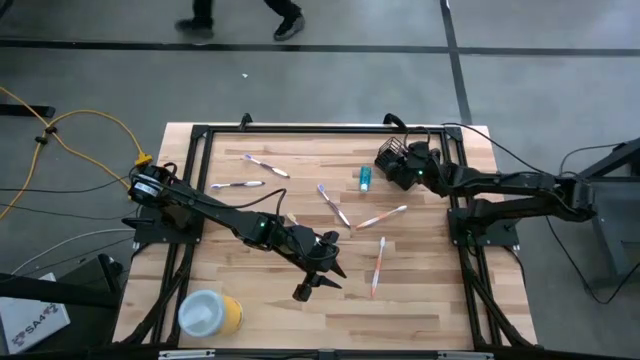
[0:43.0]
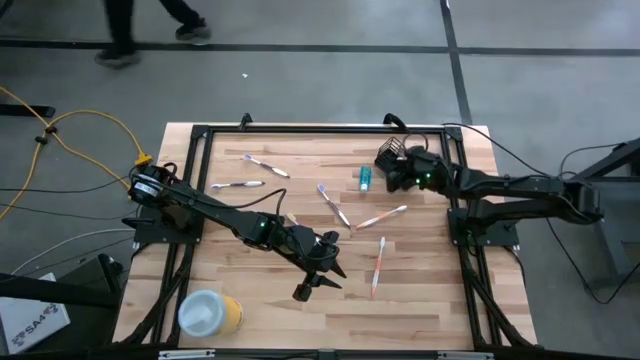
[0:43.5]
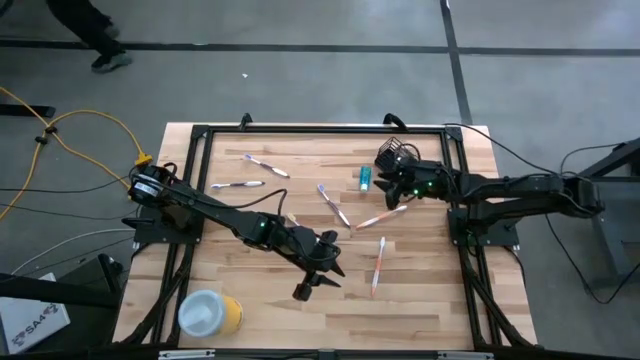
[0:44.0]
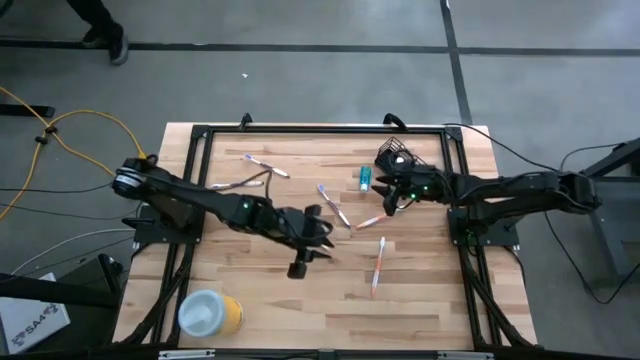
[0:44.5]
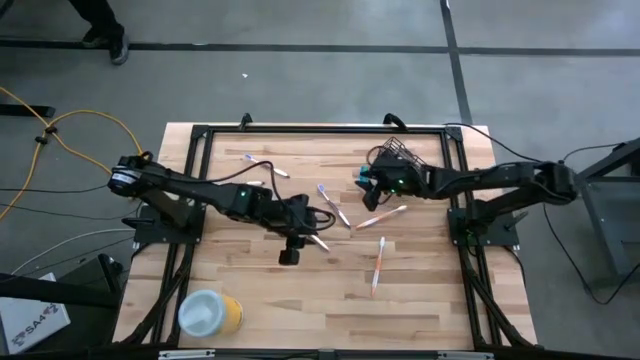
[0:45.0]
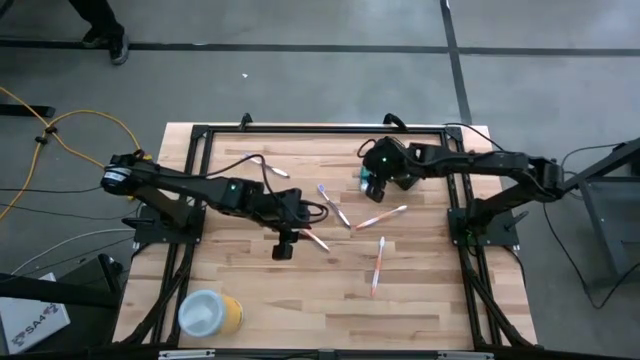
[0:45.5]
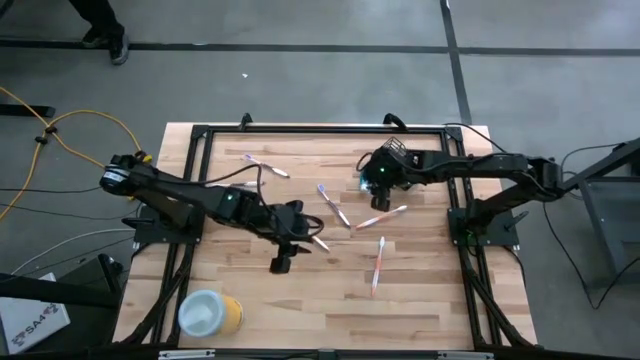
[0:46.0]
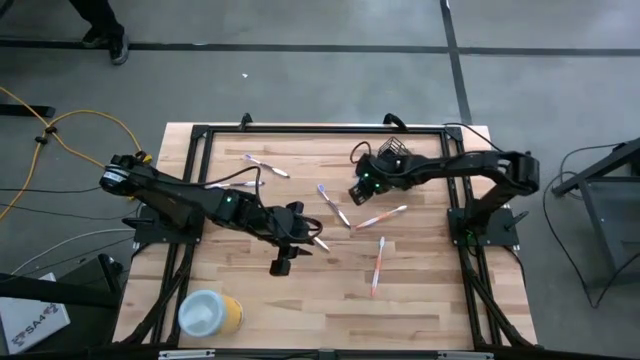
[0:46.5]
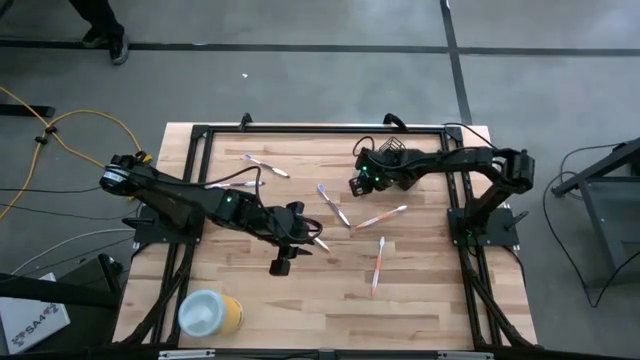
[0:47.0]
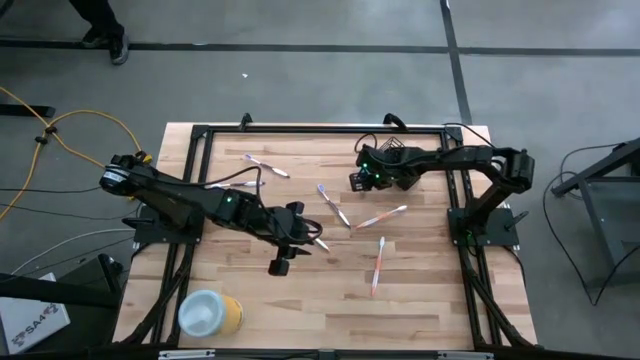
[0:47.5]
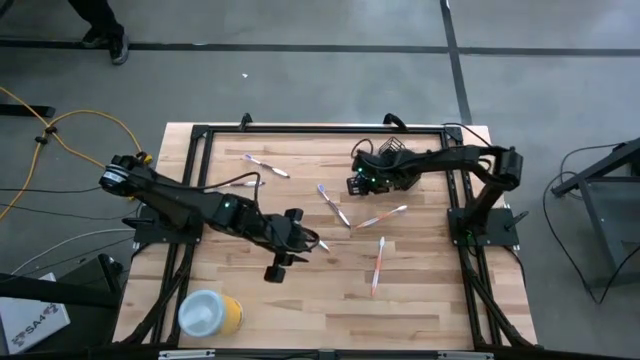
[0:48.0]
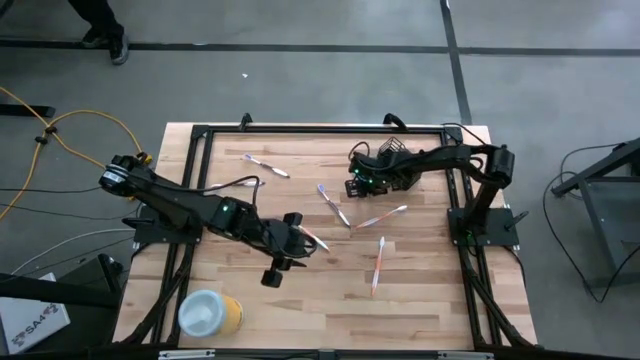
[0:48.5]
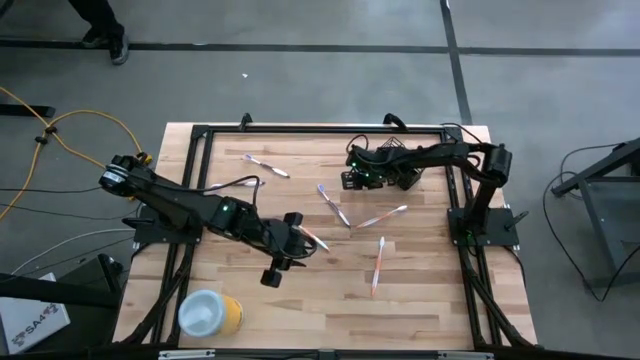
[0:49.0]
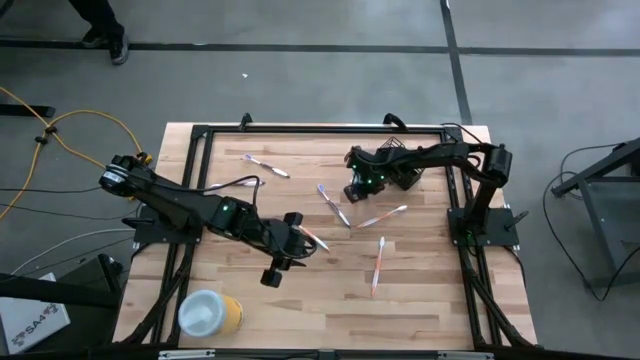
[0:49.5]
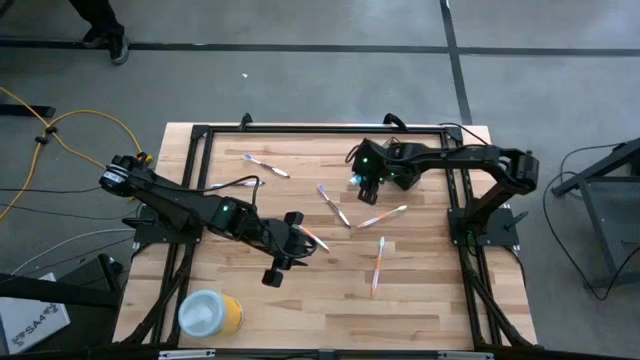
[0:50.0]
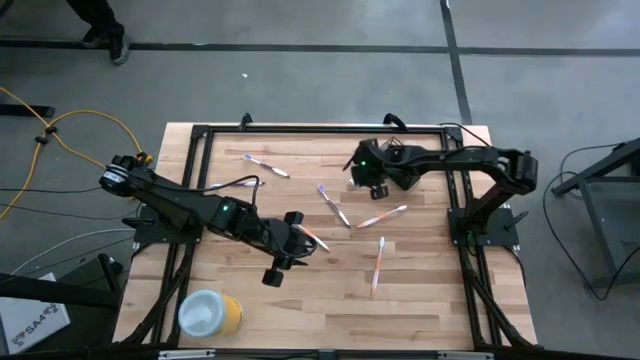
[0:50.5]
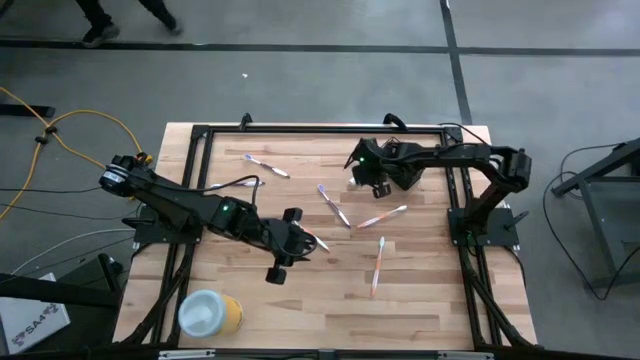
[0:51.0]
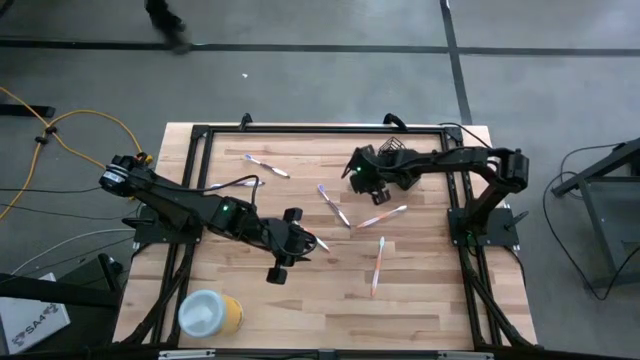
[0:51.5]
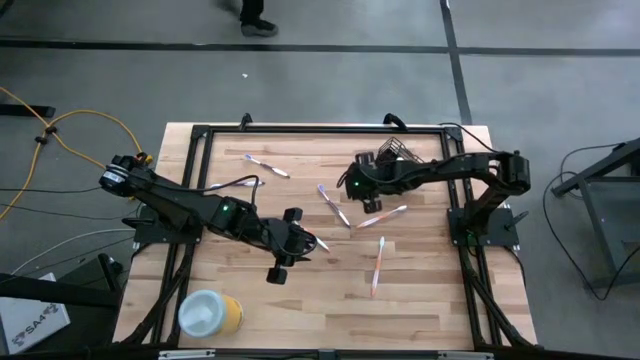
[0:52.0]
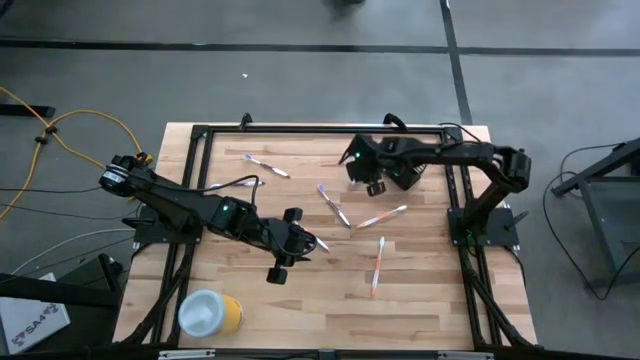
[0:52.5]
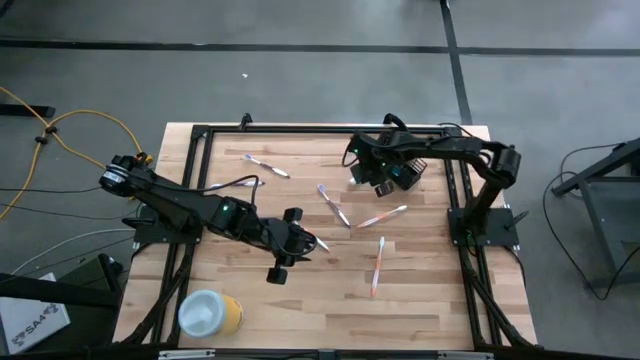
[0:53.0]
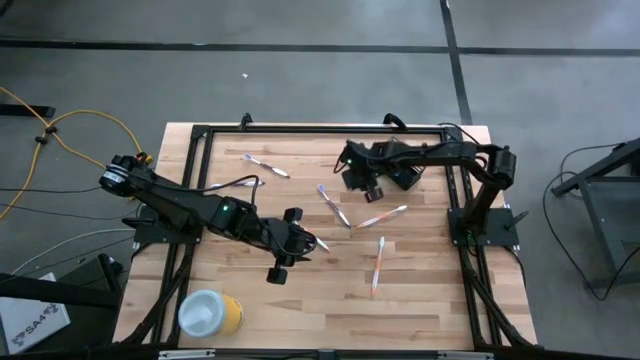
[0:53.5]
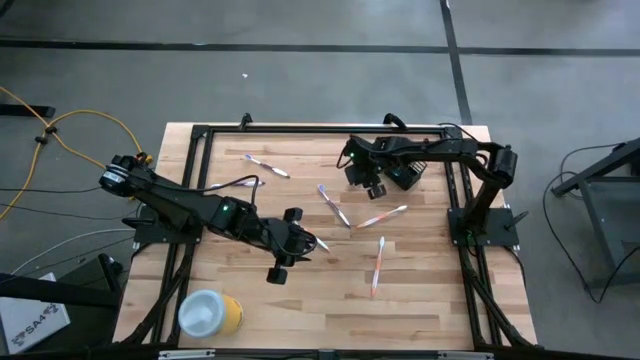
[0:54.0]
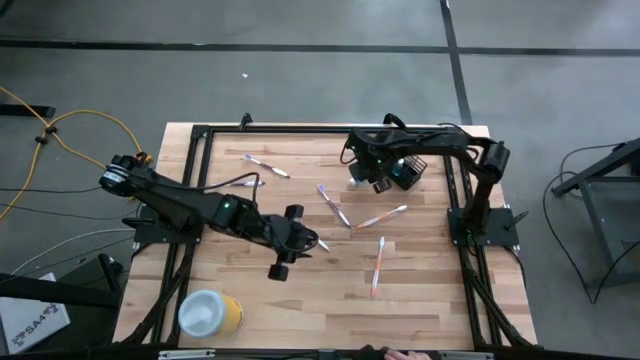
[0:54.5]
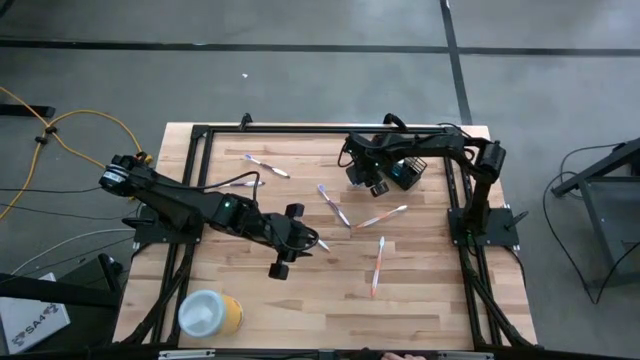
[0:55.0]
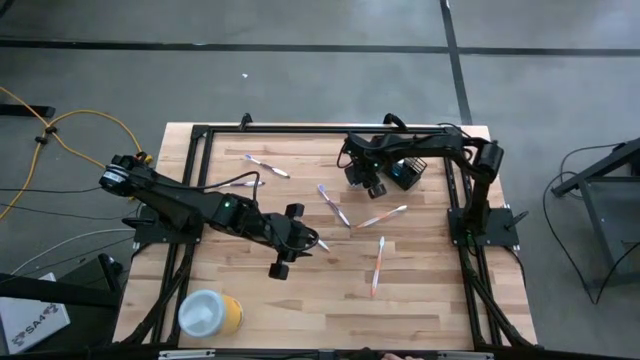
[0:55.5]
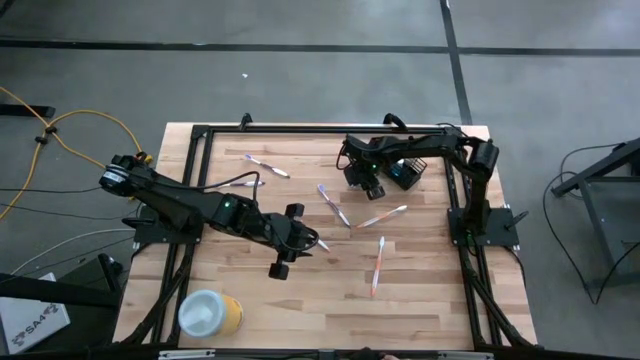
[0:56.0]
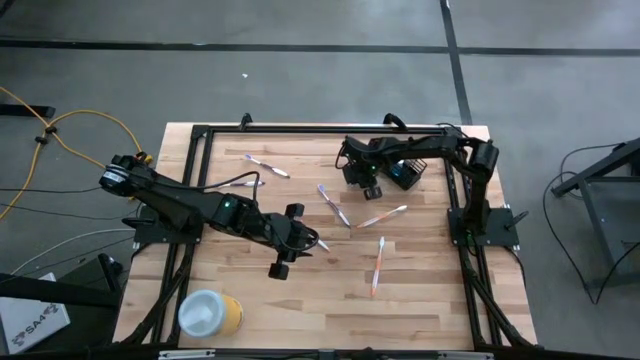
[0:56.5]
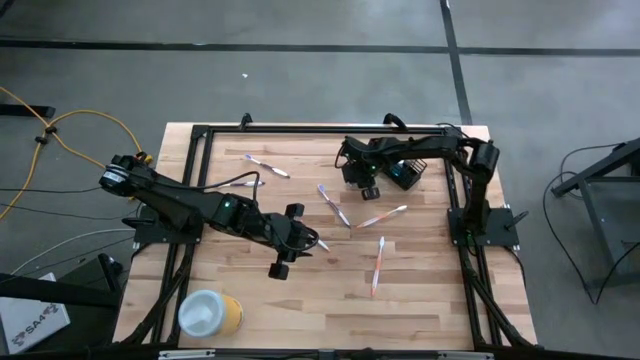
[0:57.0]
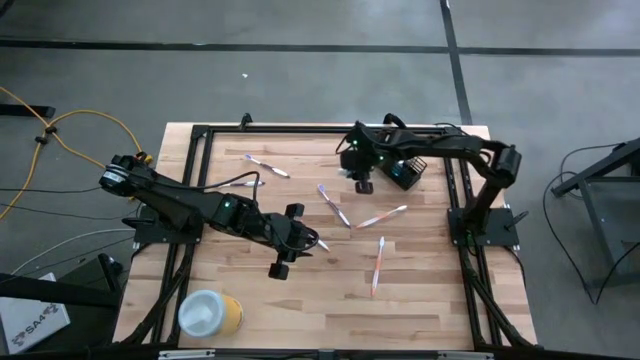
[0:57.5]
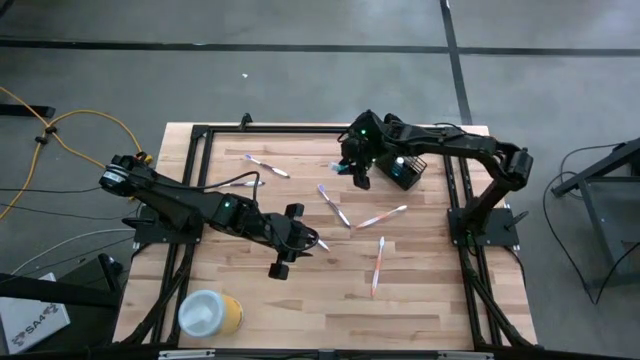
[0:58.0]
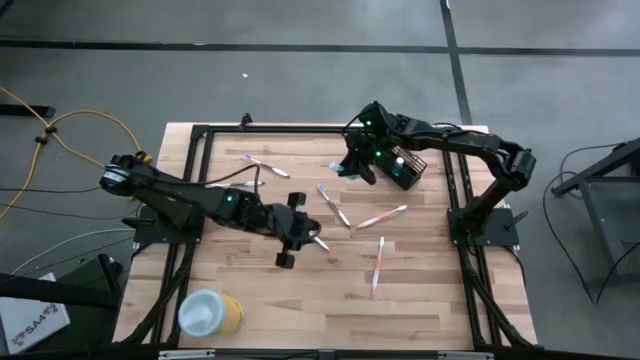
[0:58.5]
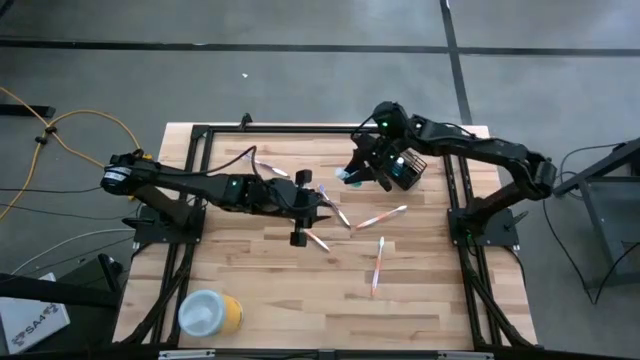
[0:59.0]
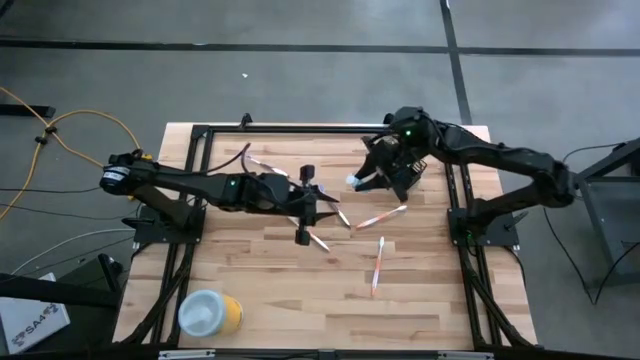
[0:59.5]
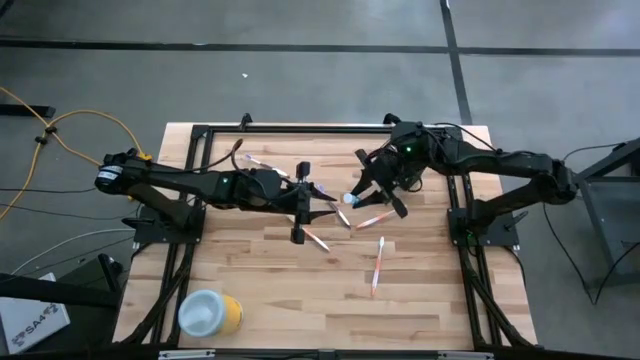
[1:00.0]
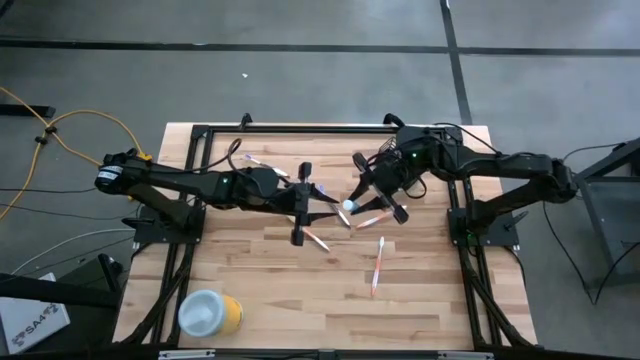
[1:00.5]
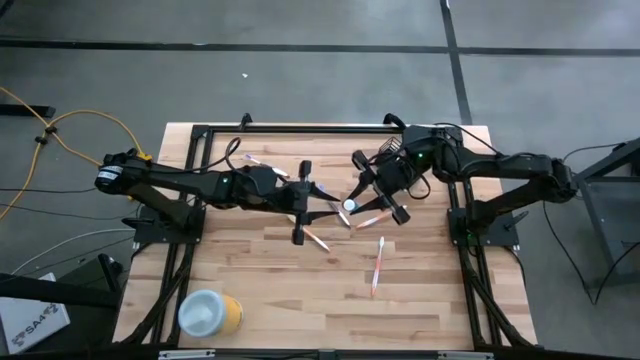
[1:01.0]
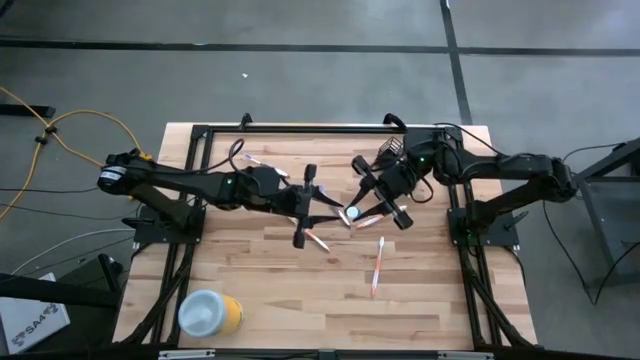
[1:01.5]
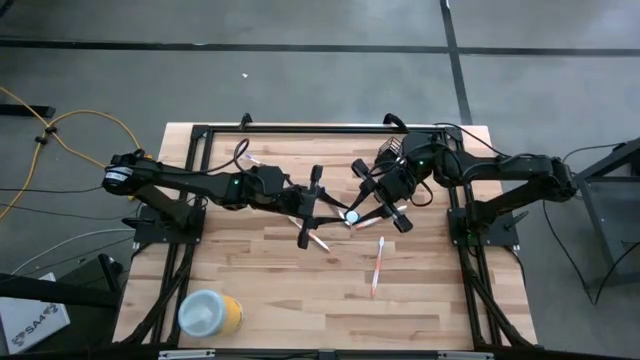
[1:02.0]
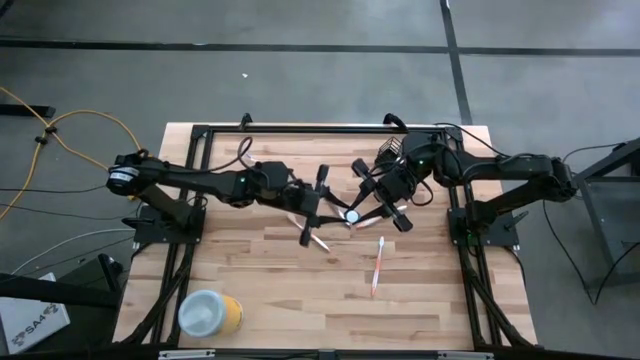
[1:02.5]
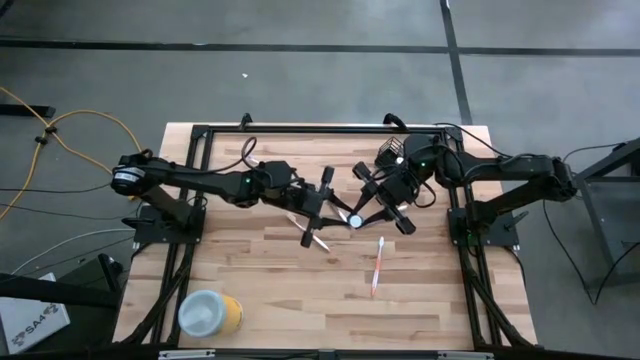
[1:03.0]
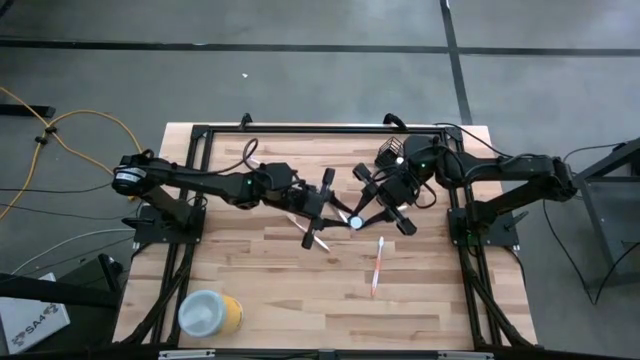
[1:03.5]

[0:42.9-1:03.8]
Task: Pick & Place toothbrushing station
Put the blue mouthwash bottle into the middle of the black mesh organizer
